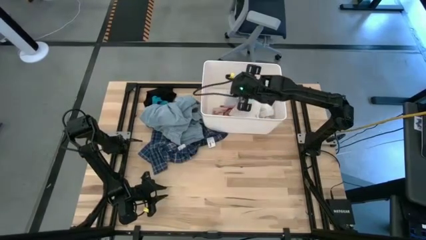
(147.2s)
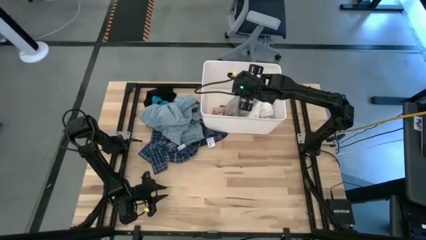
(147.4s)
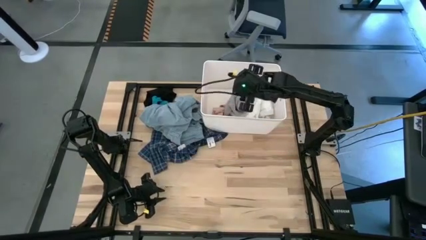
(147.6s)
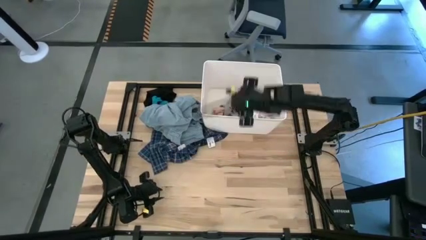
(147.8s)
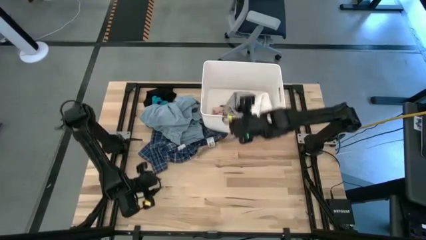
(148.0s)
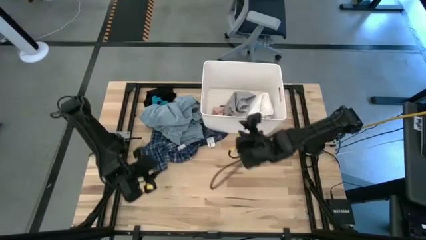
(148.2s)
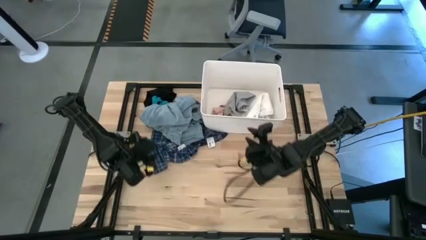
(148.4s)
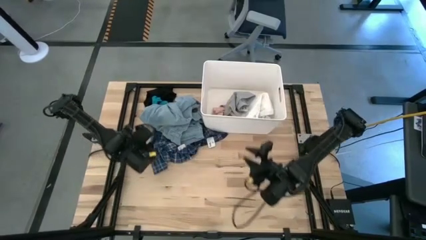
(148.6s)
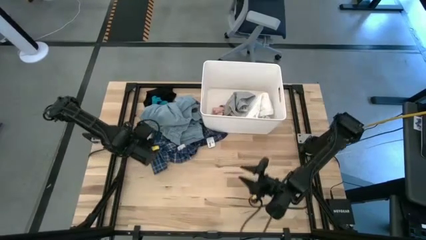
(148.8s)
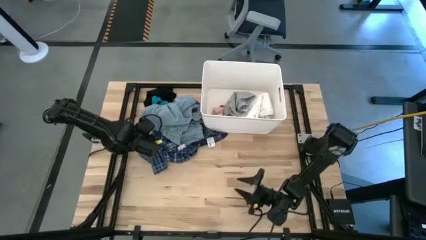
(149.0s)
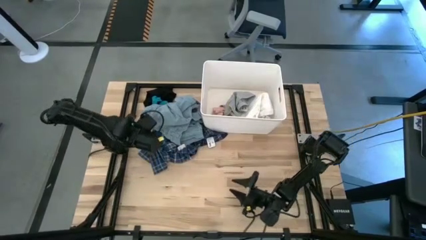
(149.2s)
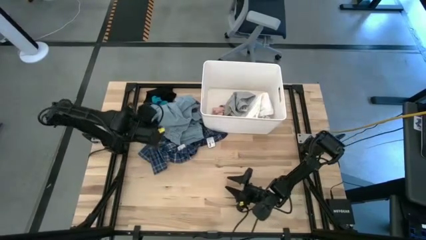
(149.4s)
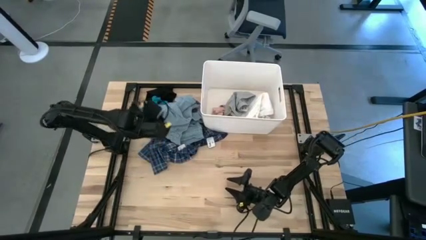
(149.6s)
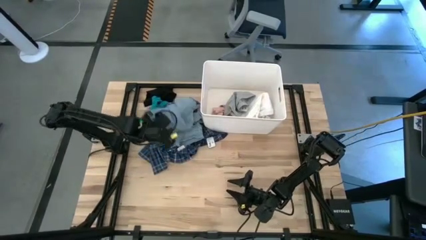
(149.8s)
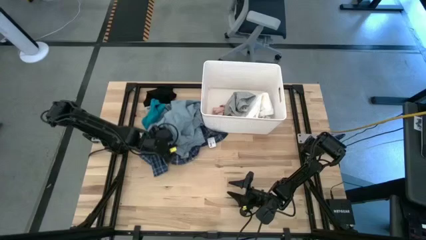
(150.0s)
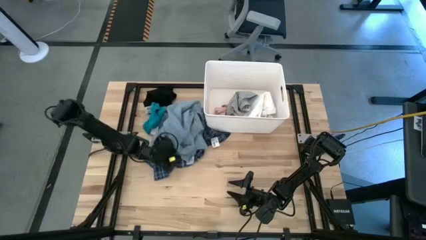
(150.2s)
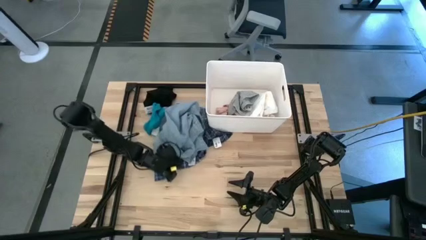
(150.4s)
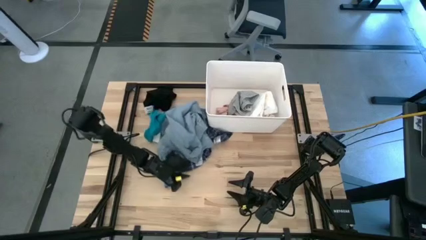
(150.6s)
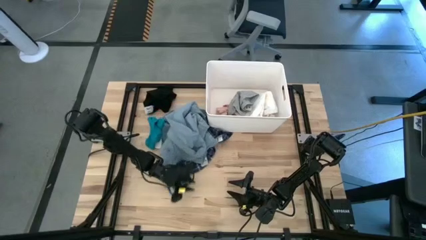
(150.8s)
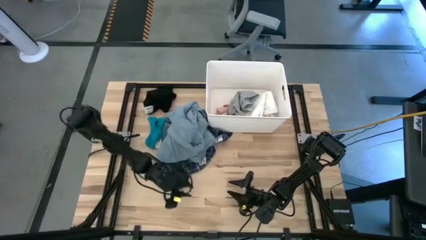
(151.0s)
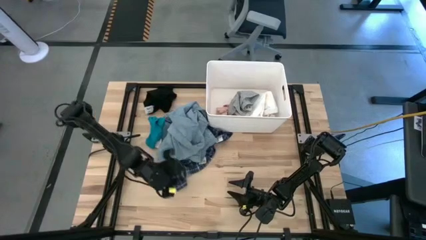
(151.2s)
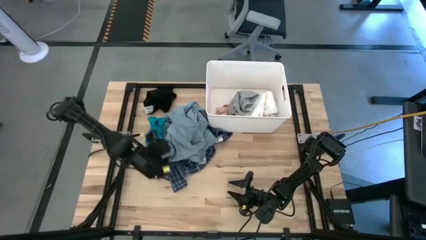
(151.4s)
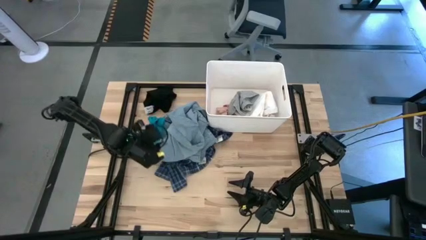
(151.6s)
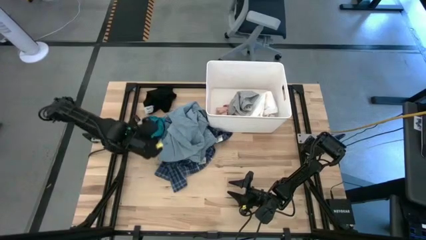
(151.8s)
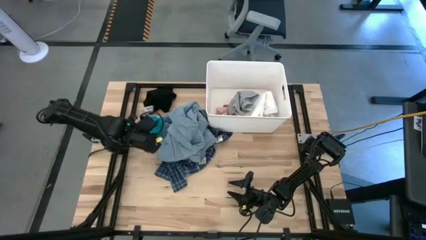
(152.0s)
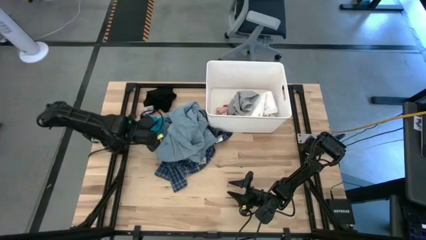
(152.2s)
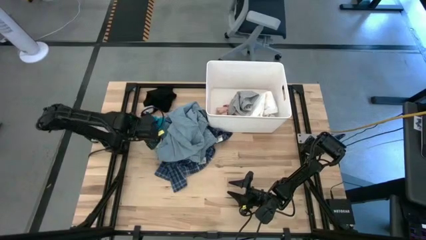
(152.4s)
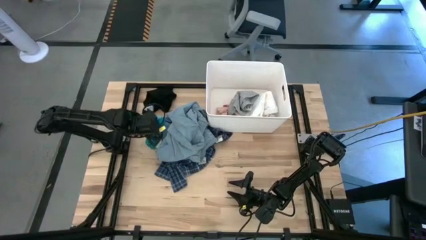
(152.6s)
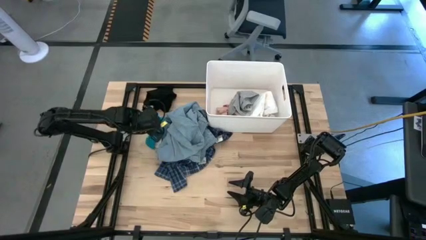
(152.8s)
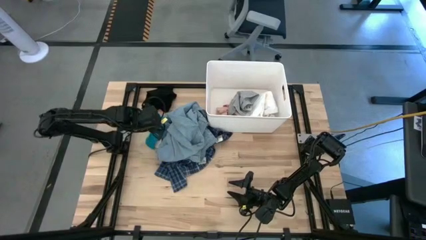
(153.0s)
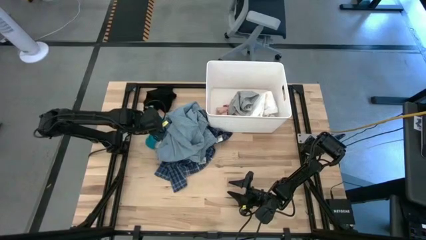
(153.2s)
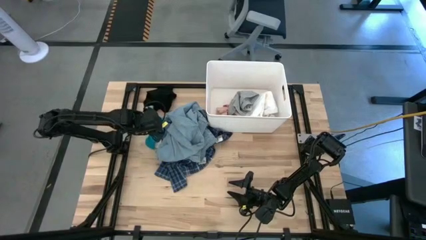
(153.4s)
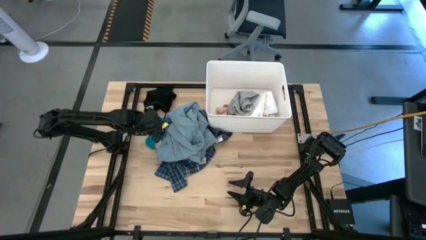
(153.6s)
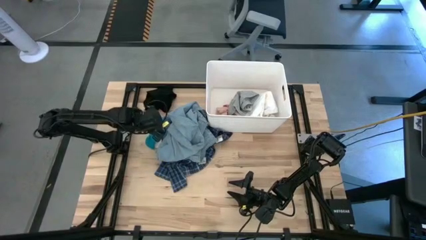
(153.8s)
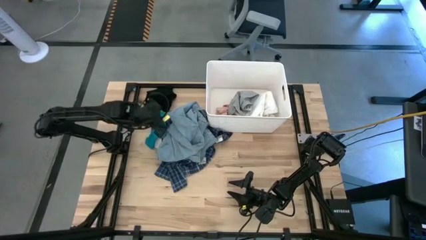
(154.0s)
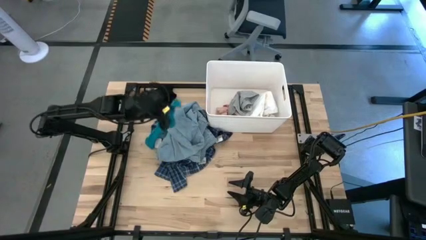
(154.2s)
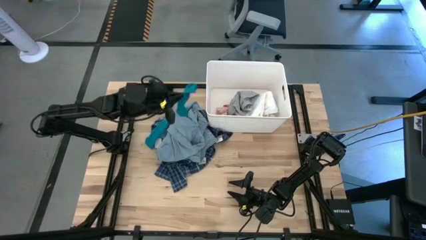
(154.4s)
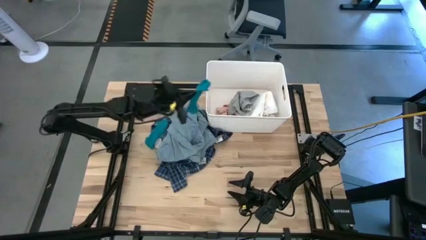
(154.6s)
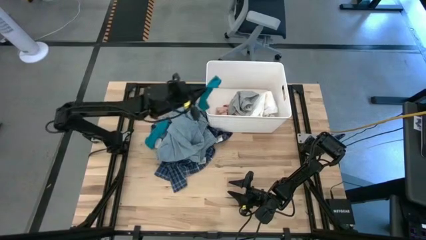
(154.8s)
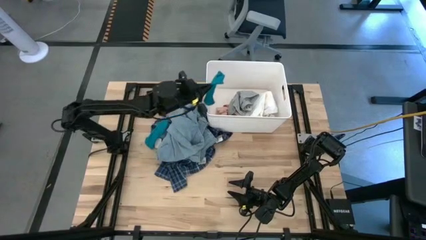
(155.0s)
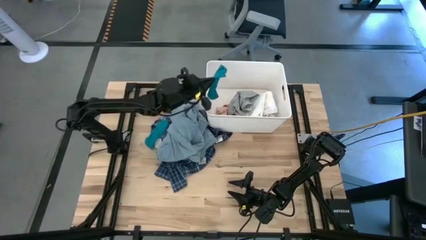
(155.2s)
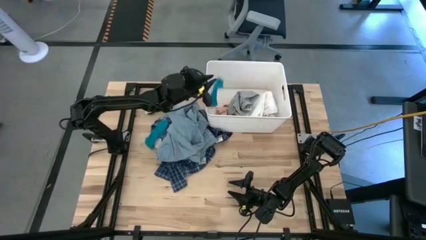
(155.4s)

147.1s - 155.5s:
Task: Sort clothes
Put the blue sock into the white laundry bin

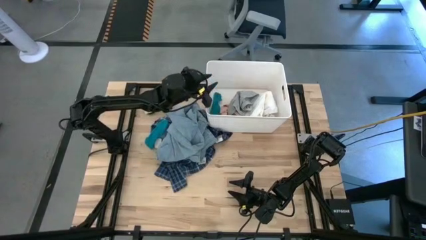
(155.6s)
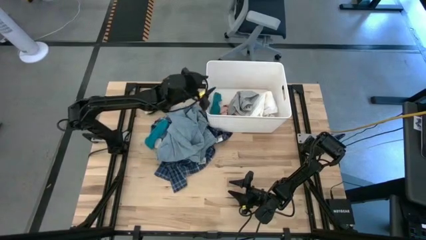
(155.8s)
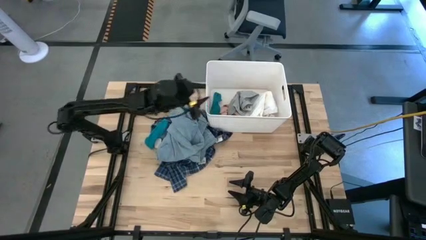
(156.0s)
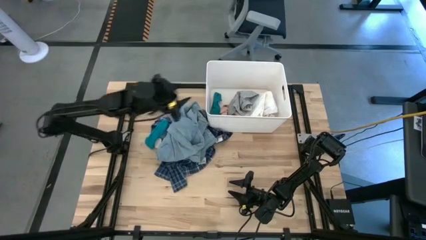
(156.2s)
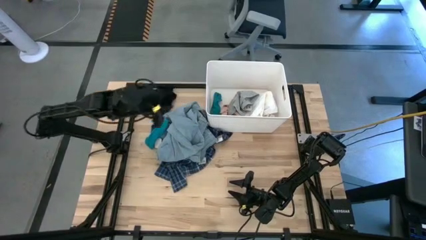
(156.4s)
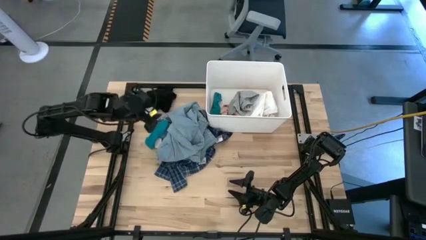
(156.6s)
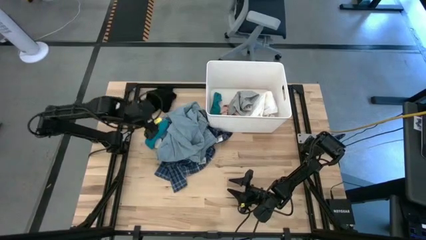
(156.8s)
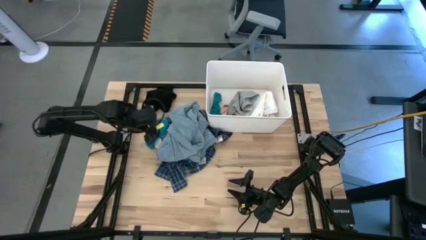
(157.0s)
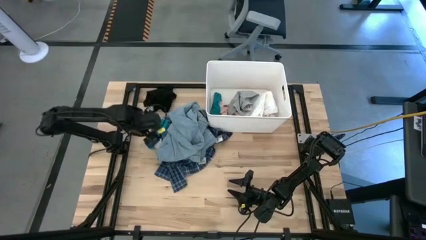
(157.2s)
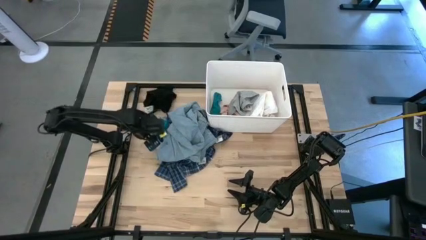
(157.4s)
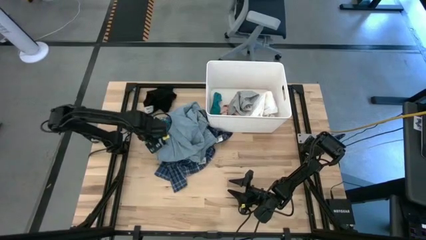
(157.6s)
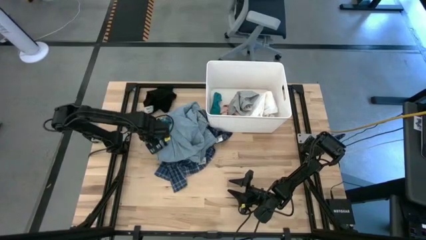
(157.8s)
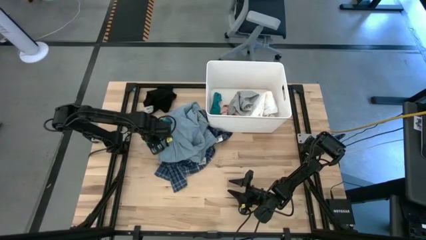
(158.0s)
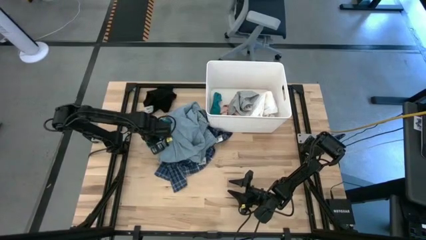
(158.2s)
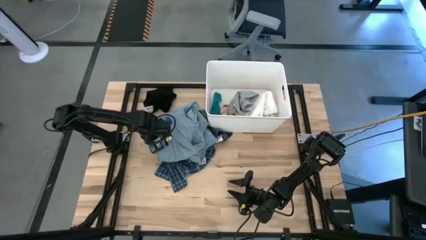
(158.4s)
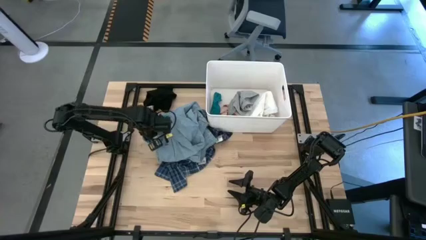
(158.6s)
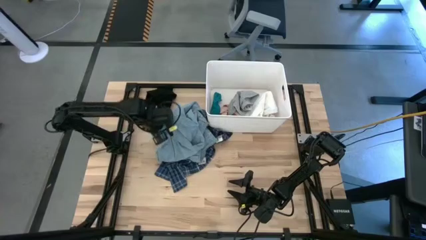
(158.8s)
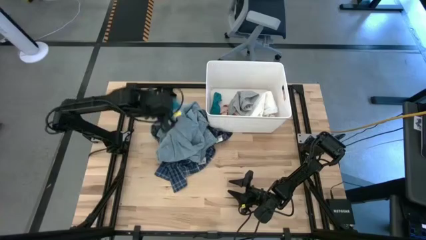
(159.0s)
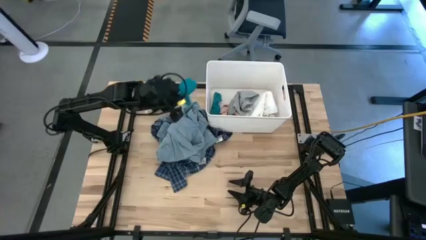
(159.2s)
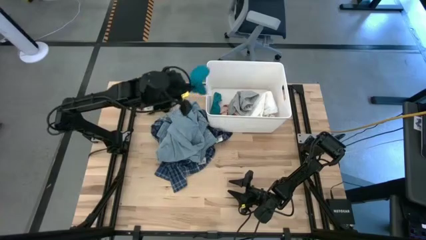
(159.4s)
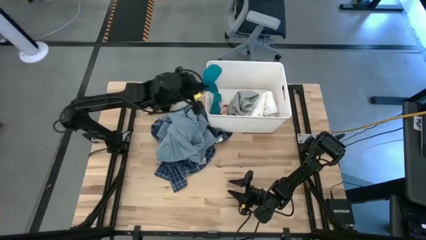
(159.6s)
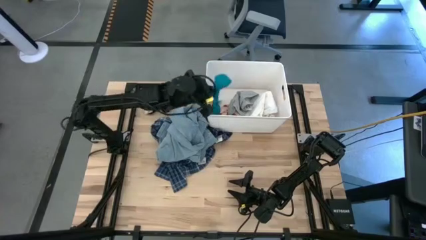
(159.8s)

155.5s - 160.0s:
Put the blue sock into the white laundry bin

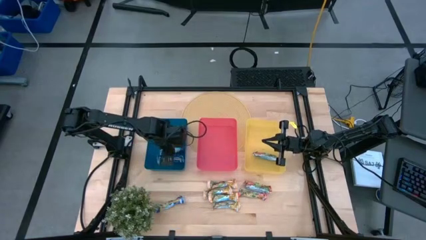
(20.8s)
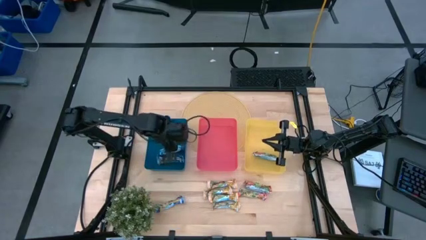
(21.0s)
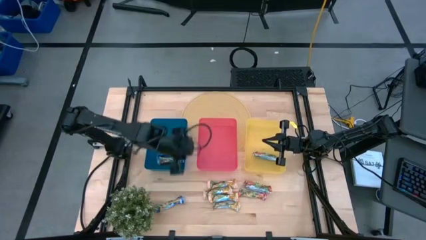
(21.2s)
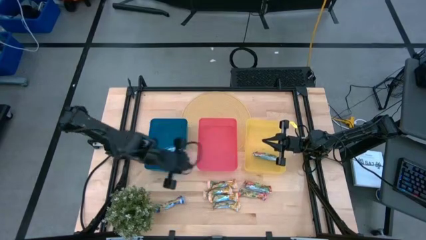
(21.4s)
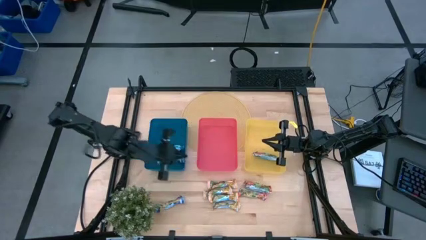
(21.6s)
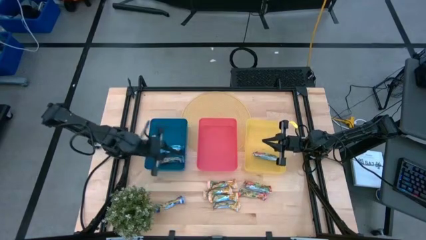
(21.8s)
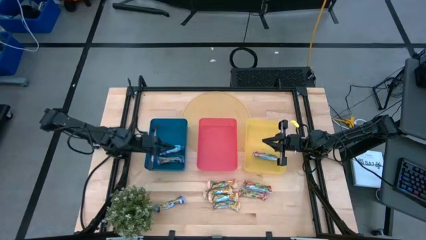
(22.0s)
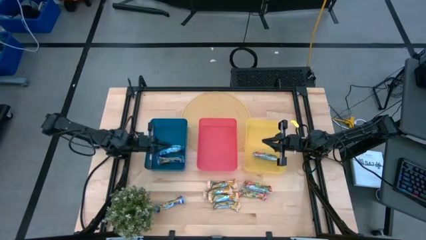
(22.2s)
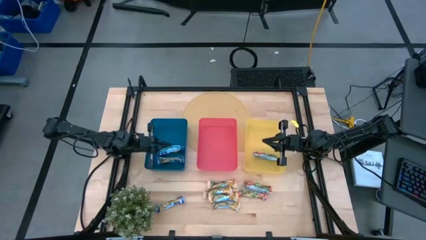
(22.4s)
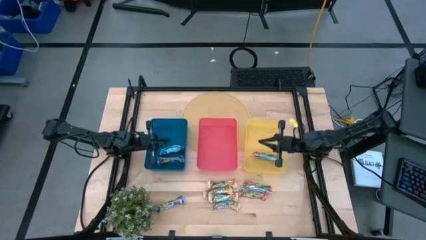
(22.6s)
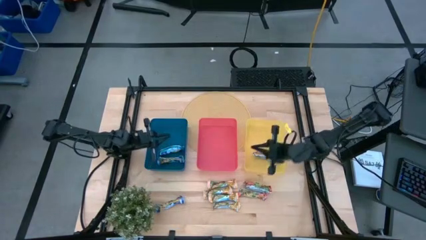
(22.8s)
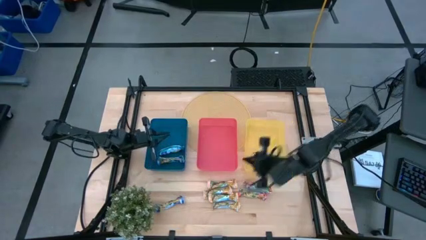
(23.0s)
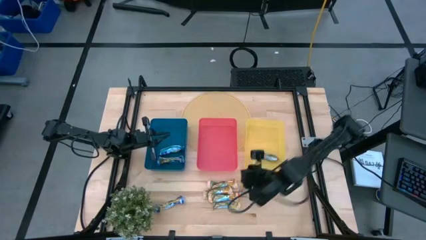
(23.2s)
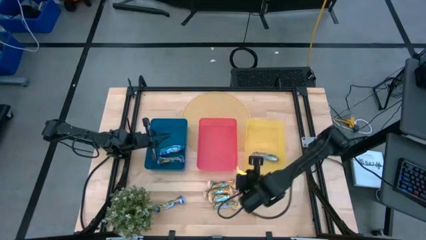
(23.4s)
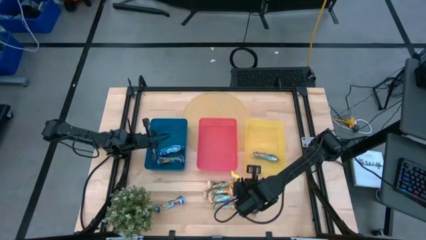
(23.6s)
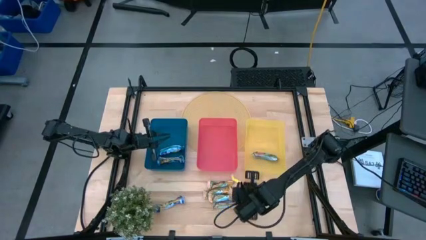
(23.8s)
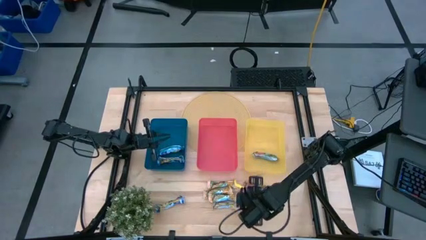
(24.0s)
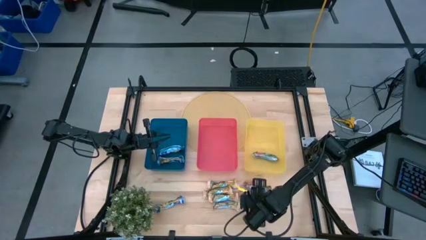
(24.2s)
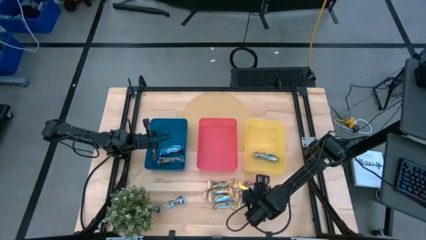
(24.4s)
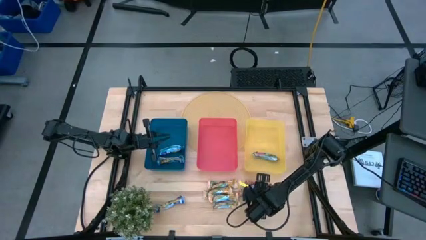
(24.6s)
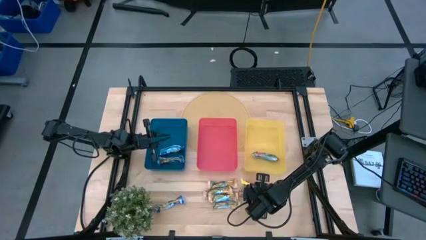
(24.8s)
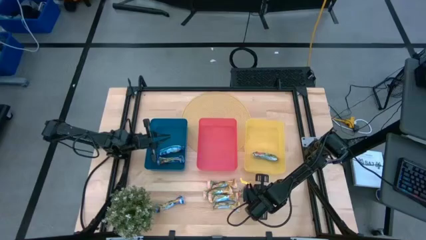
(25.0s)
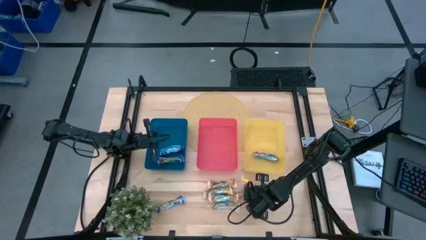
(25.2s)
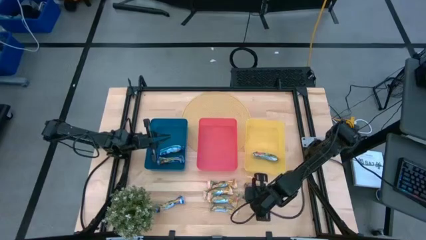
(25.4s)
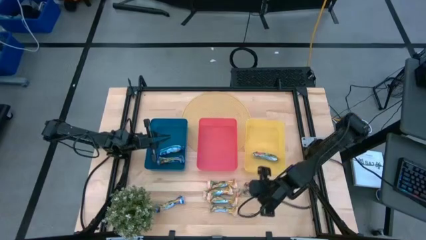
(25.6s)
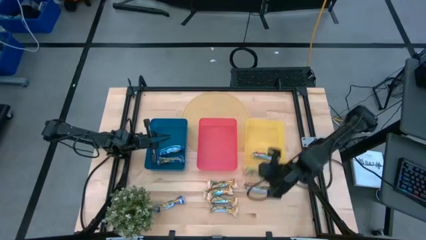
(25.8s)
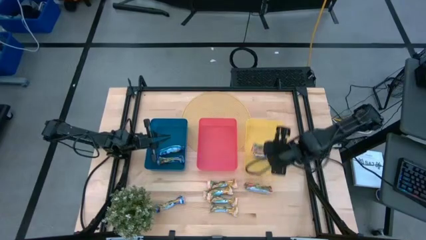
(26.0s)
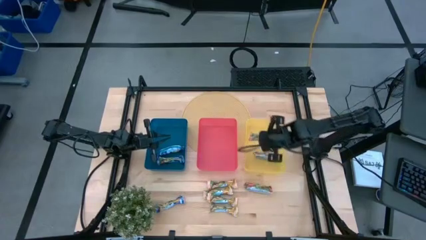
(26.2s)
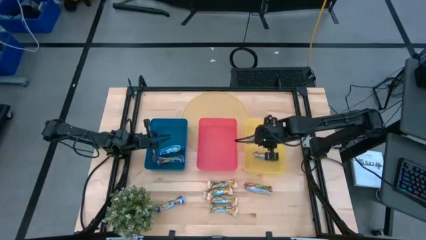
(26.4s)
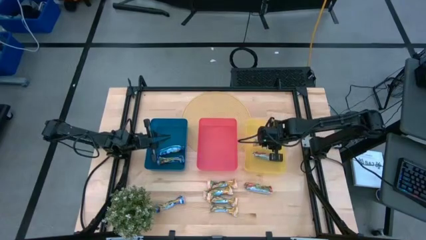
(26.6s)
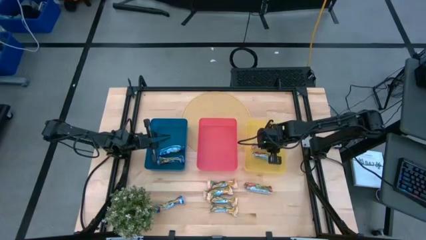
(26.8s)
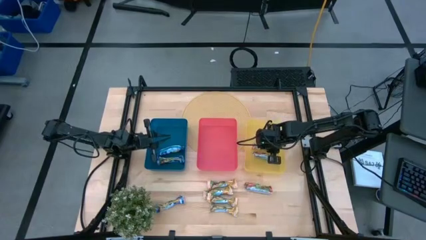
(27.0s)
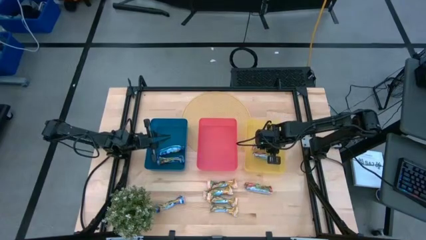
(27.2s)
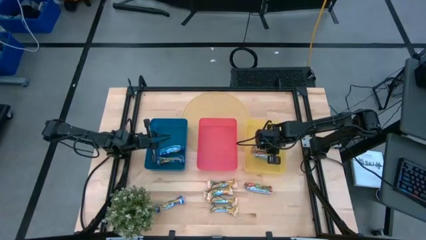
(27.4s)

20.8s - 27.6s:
Task: Pick and place Granola Bars by type
Put the bottom green granola bar into yellow bin
